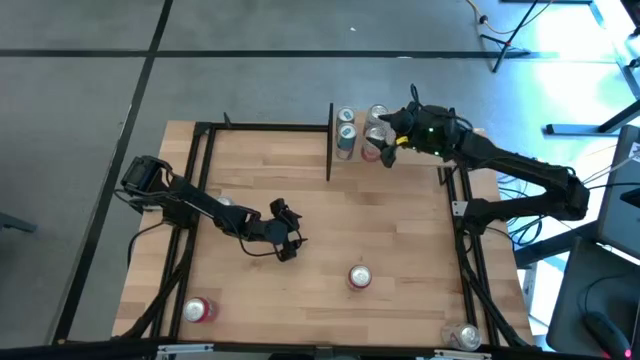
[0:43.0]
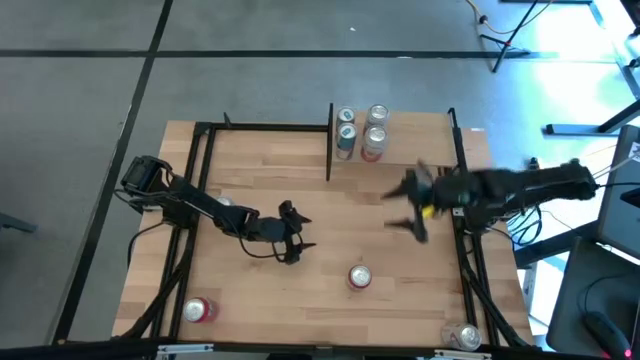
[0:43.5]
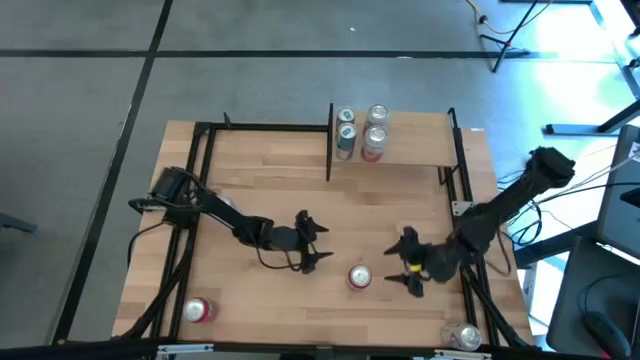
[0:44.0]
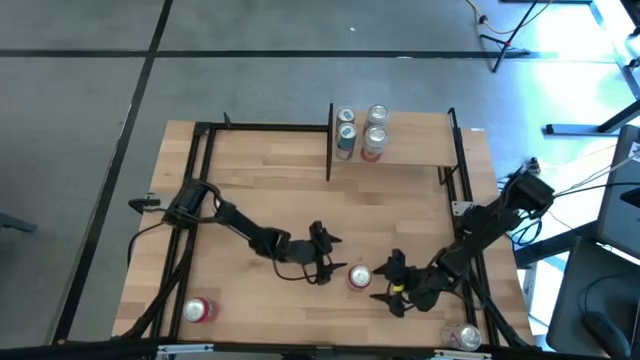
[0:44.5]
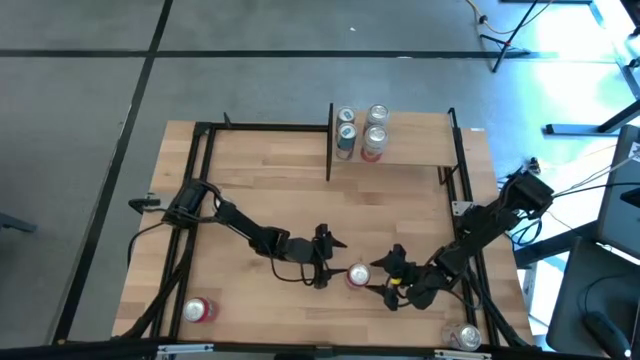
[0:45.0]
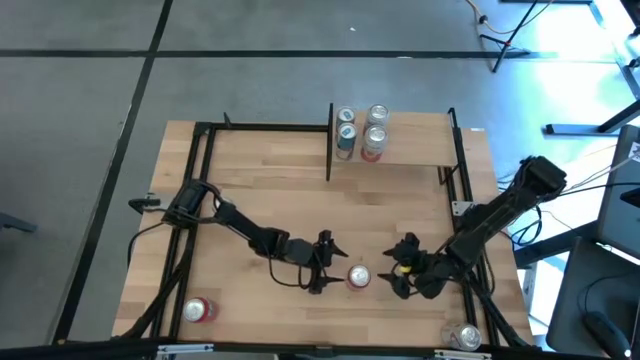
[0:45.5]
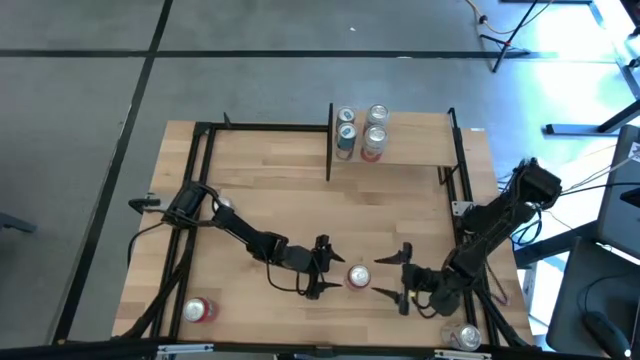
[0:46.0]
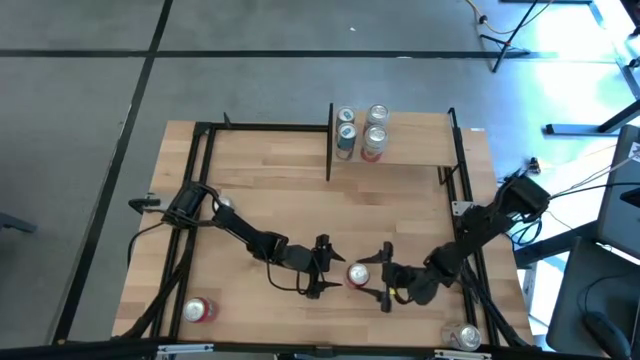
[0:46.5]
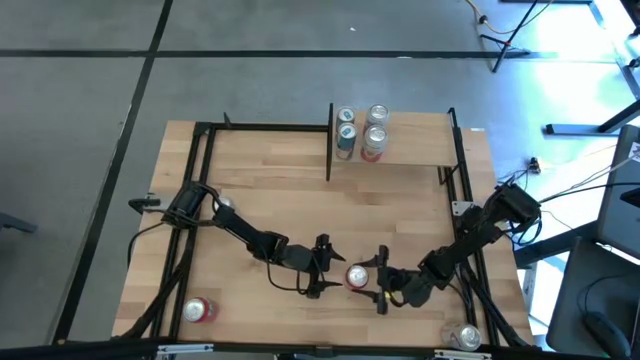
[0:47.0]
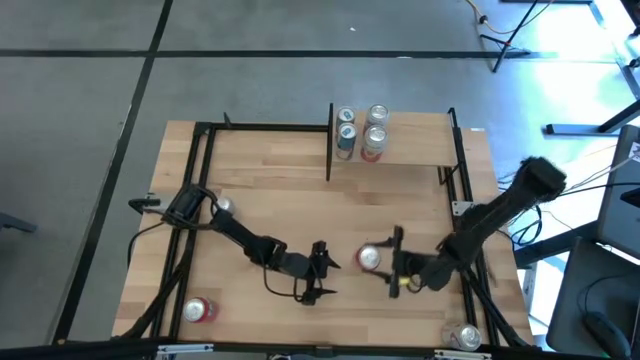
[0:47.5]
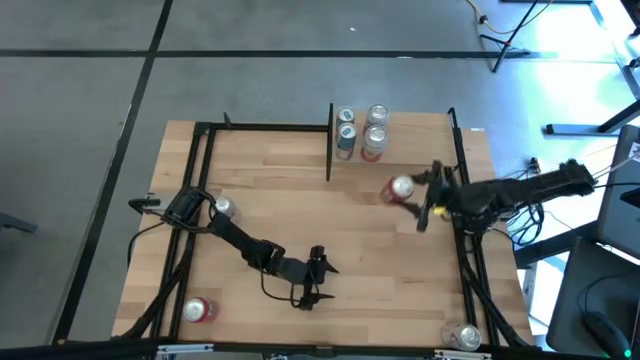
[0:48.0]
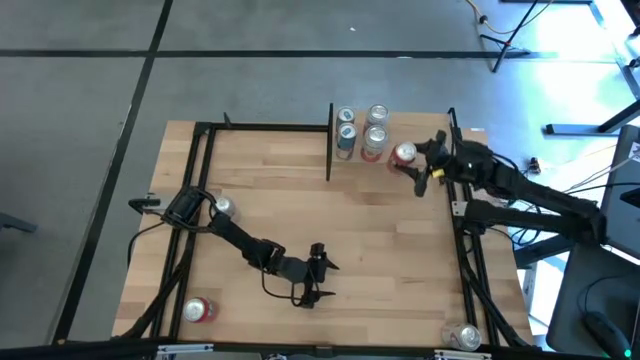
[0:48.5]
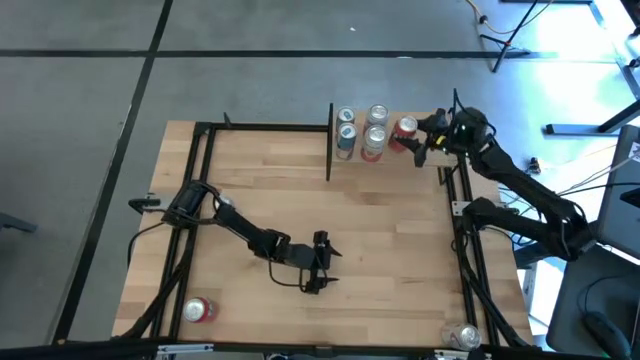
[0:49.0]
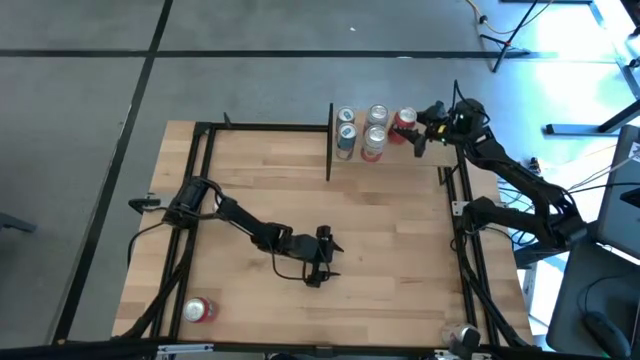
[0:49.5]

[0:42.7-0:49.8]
Task: Place canned beverage on shelf
Put the right red soda can on the shelf

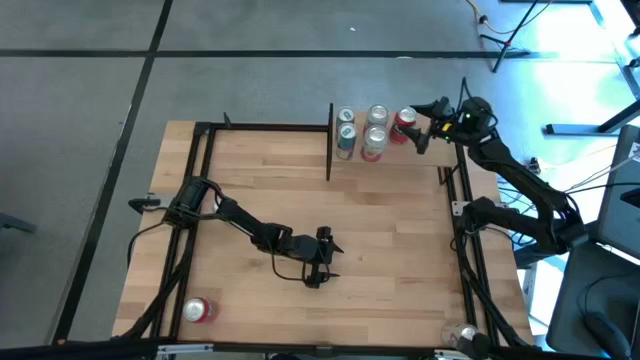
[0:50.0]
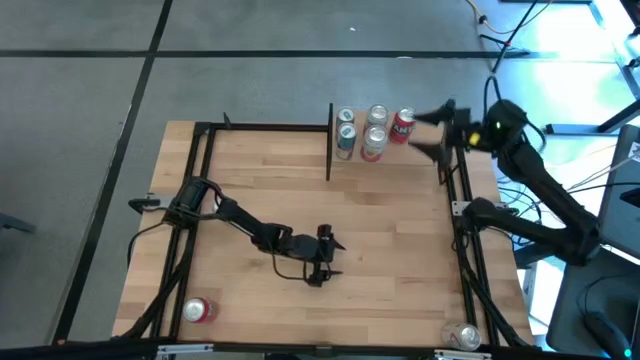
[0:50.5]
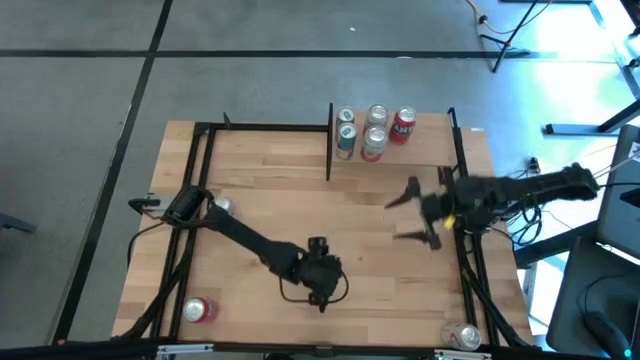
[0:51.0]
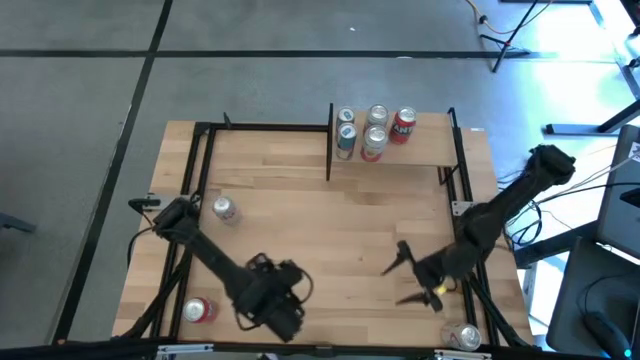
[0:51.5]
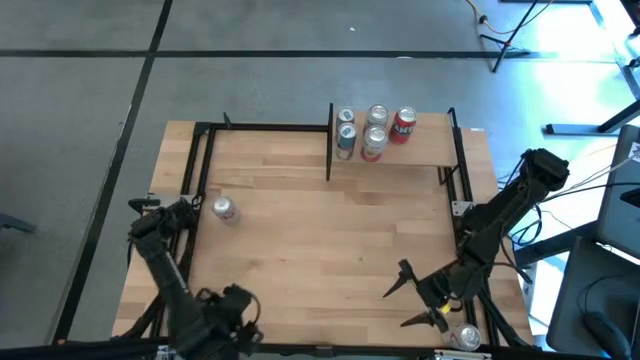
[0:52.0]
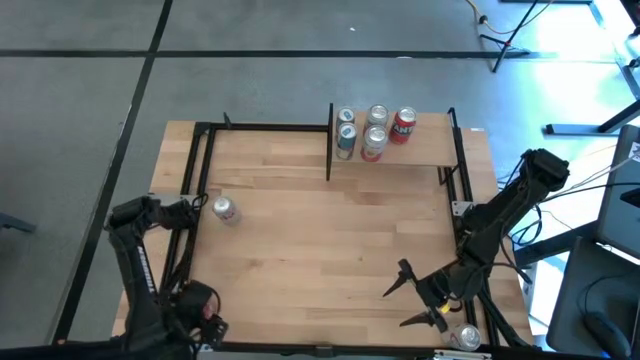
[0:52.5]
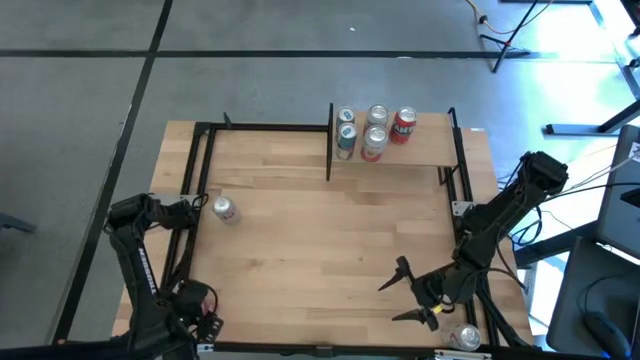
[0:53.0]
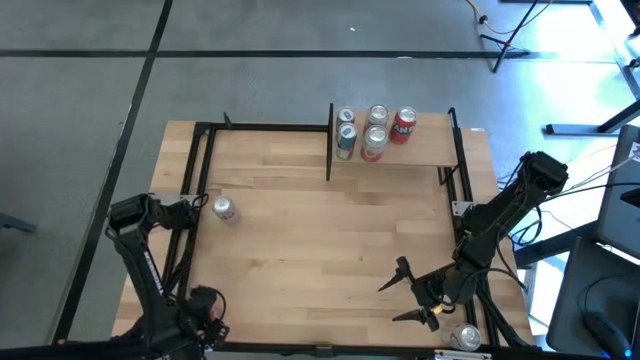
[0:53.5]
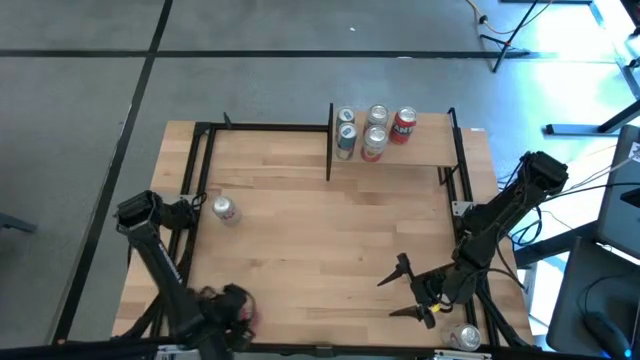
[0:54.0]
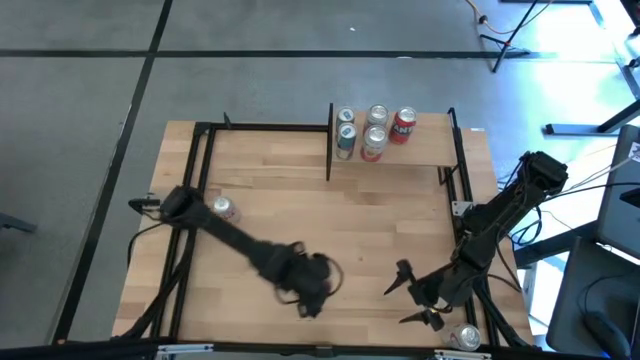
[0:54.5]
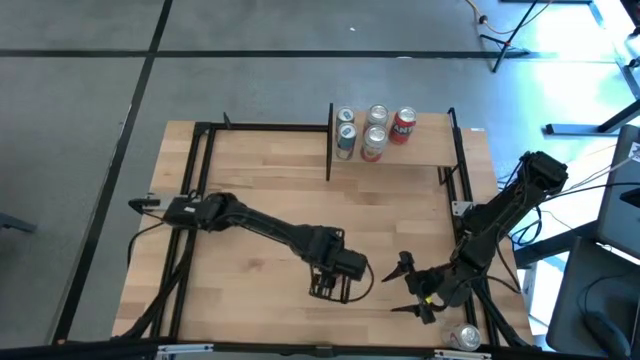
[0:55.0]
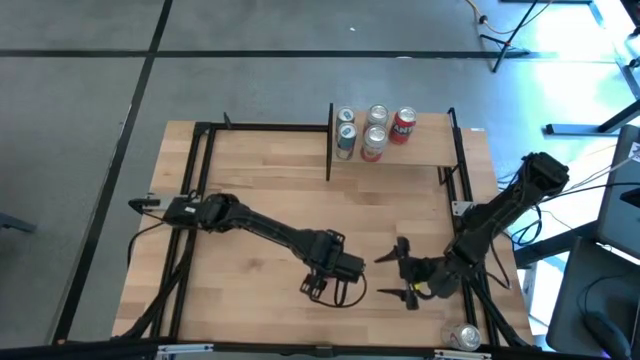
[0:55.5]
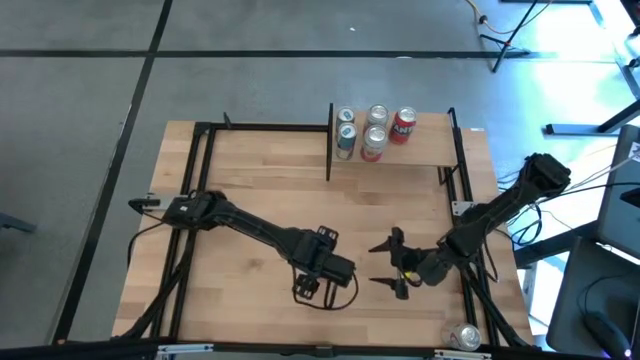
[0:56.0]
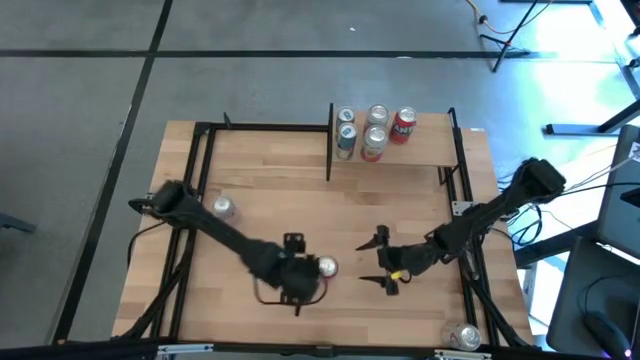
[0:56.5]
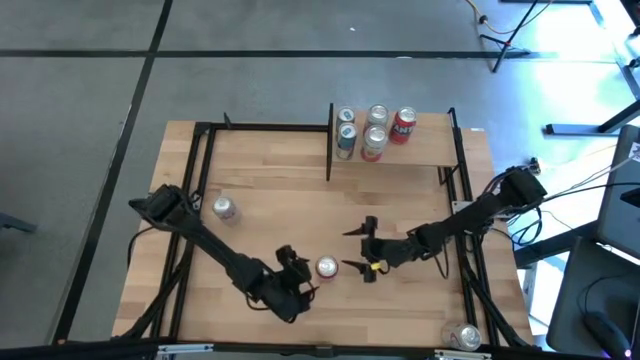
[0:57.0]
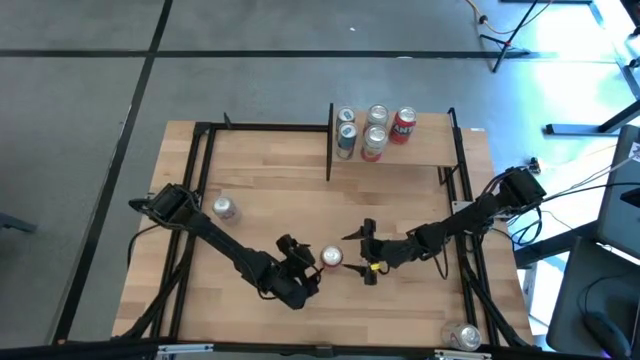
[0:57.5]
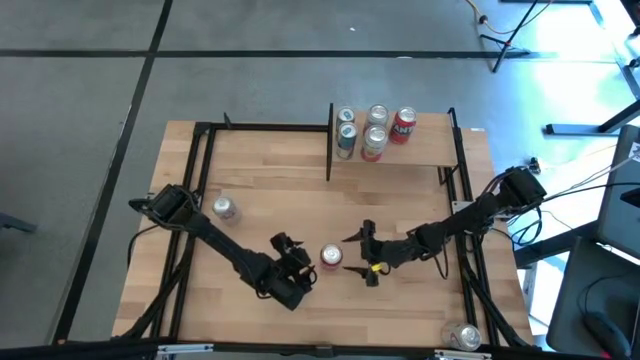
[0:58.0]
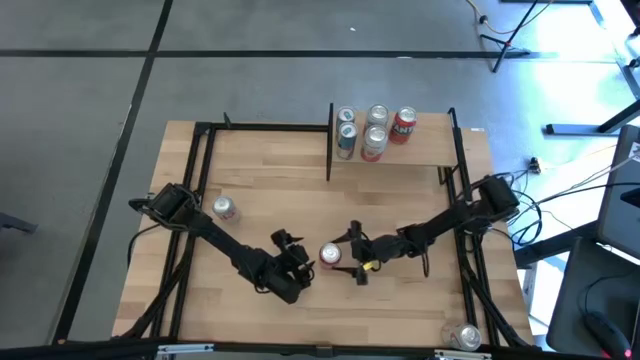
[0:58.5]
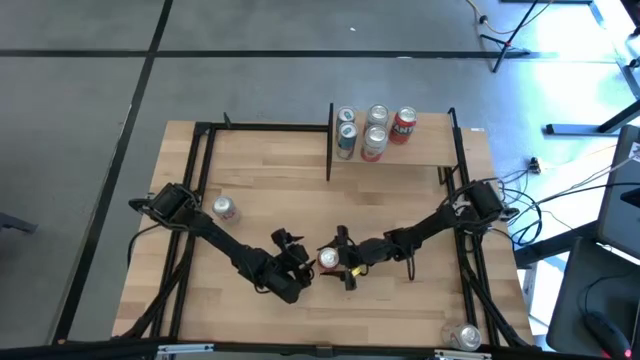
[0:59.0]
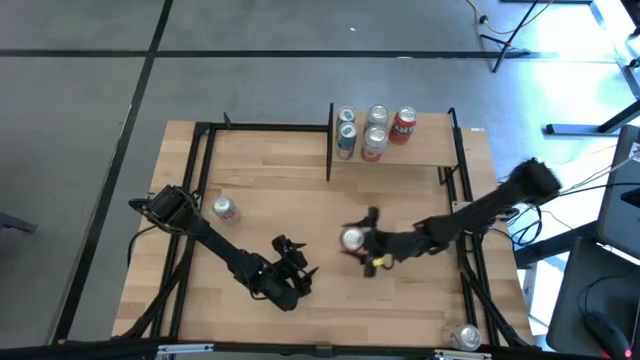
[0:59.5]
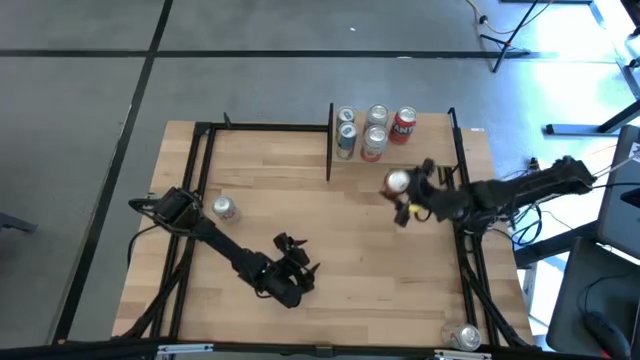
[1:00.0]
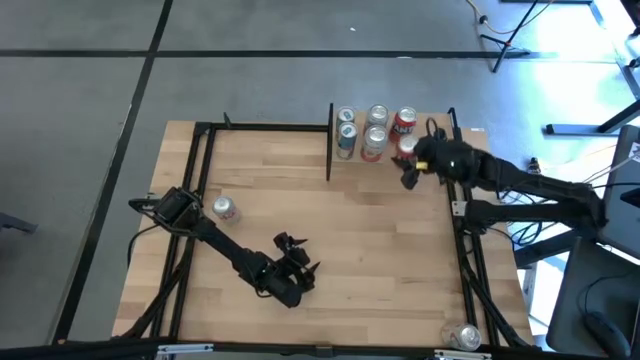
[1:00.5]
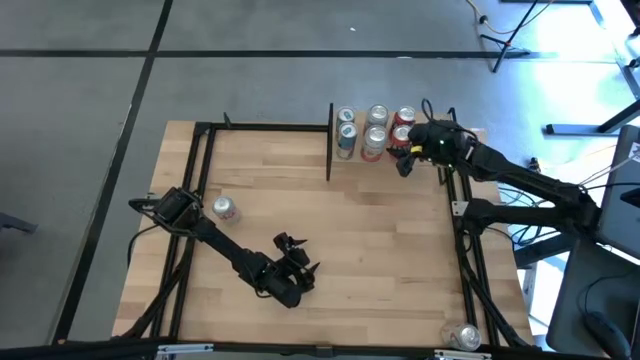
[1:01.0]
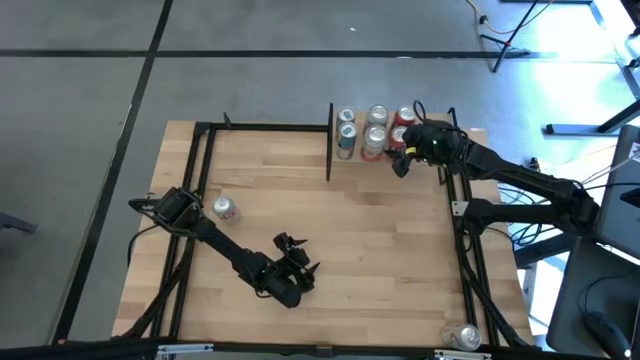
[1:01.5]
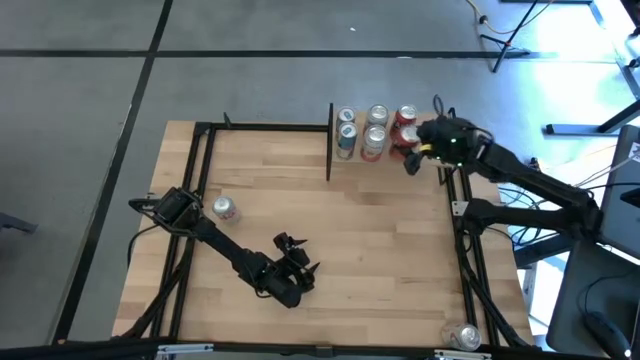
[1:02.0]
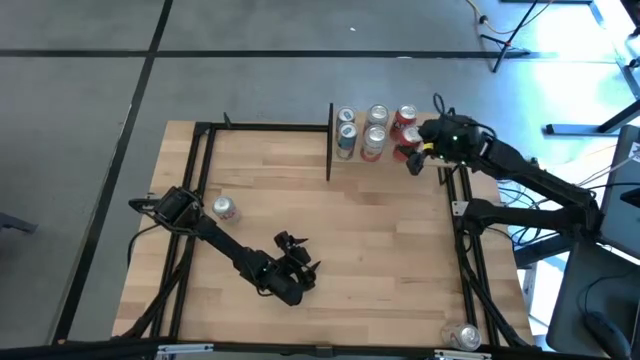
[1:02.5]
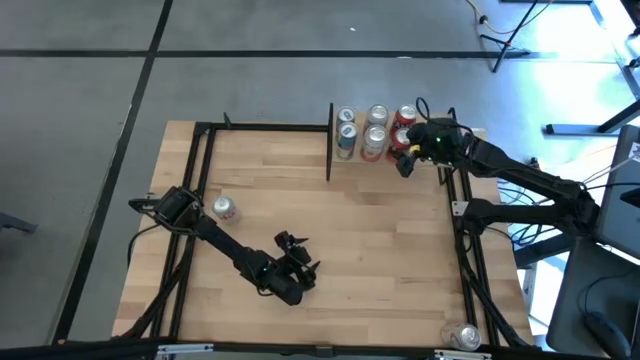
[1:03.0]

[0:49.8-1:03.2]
Put the red soda can and align with other red can on the shelf

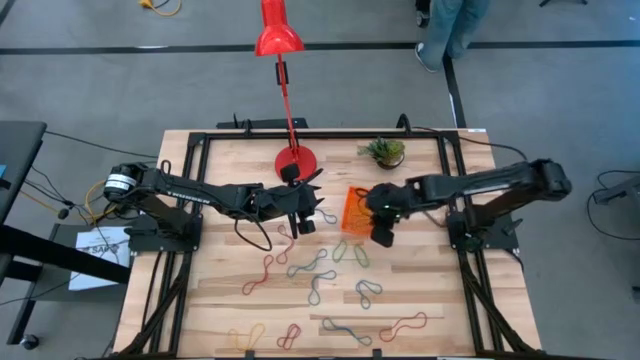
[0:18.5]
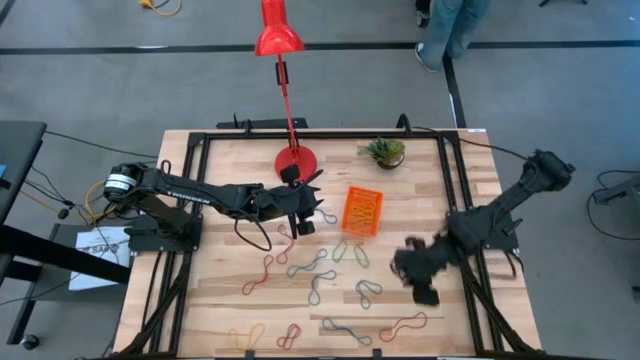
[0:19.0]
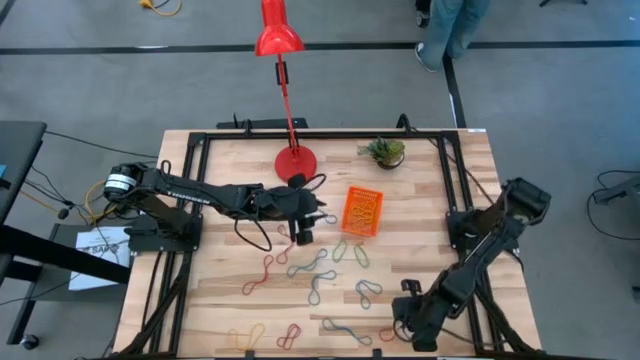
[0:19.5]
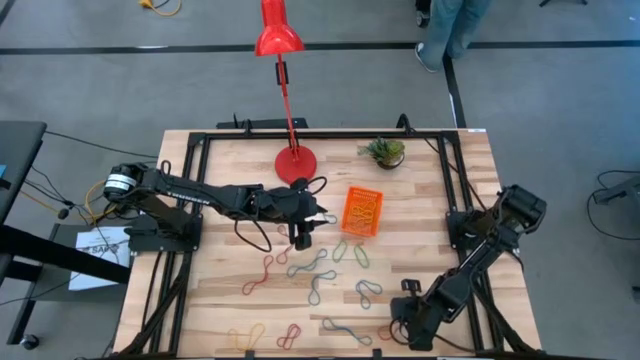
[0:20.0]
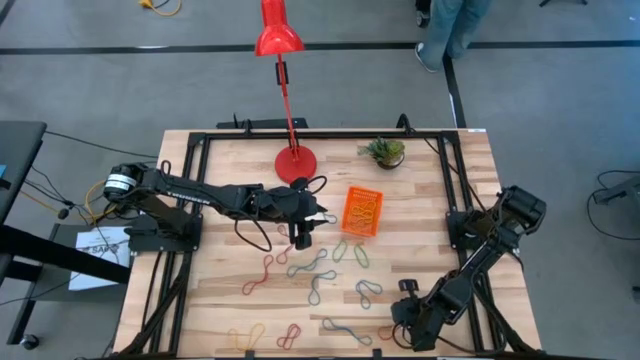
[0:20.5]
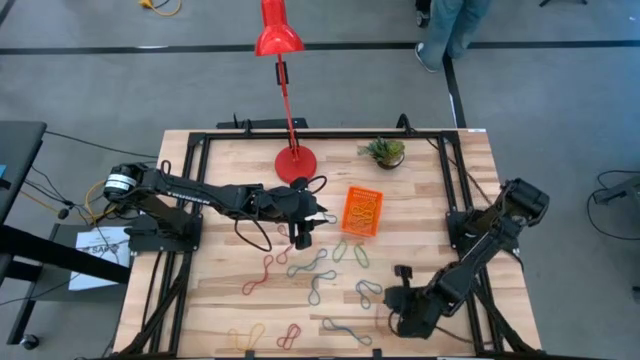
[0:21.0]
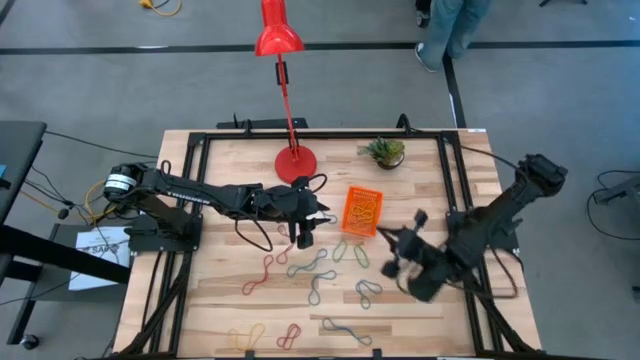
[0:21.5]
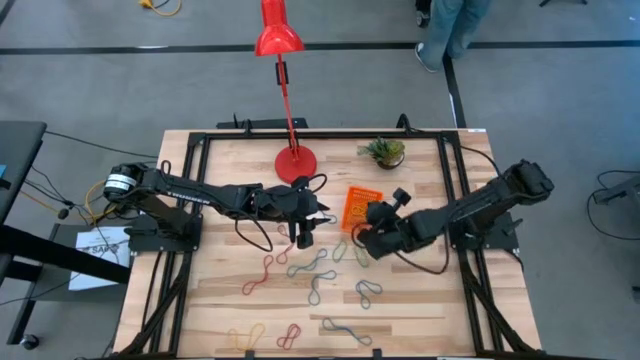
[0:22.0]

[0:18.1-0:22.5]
Task: Pick and place items into bin
Put the bottom right red rubberband into the orange basket
